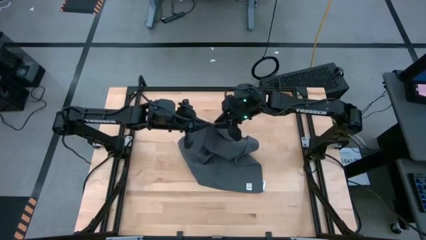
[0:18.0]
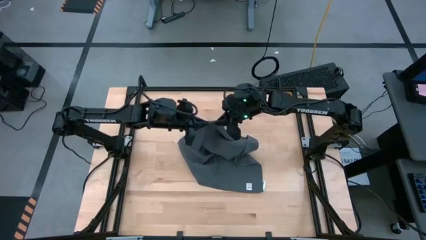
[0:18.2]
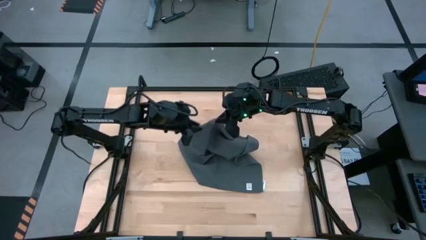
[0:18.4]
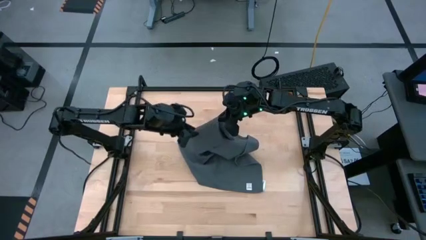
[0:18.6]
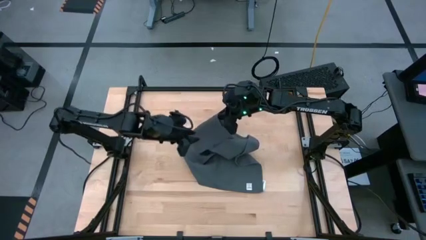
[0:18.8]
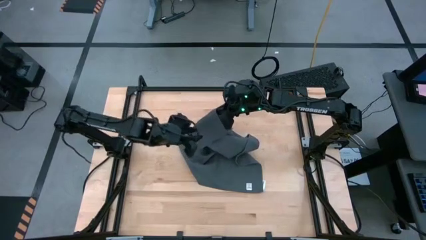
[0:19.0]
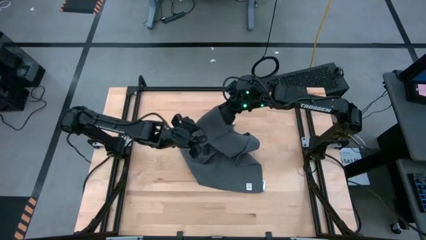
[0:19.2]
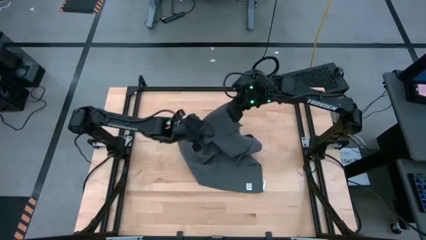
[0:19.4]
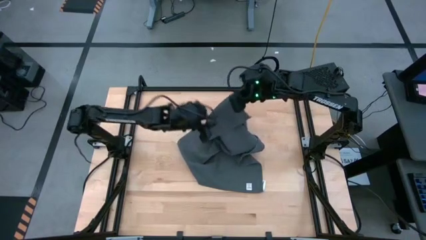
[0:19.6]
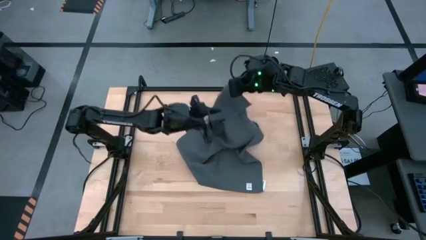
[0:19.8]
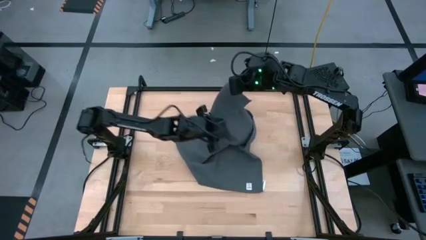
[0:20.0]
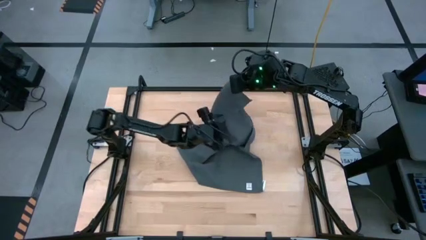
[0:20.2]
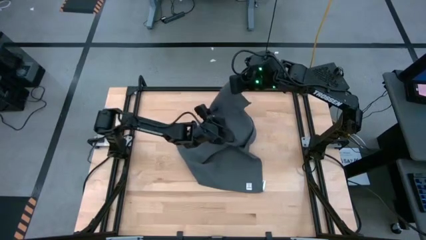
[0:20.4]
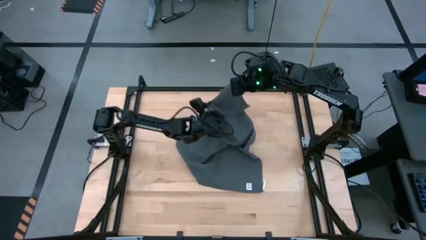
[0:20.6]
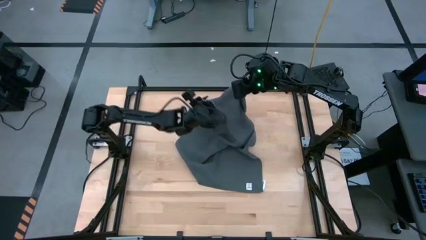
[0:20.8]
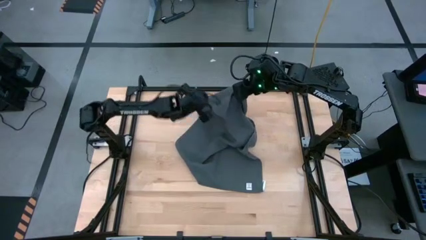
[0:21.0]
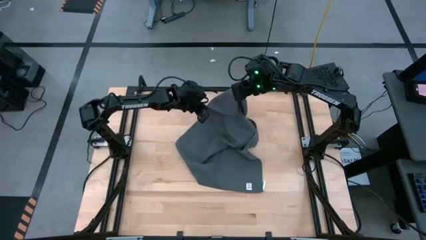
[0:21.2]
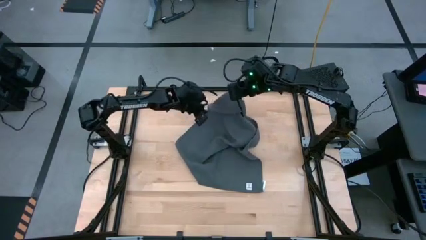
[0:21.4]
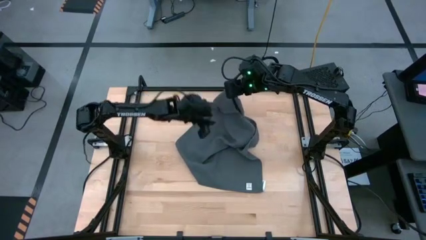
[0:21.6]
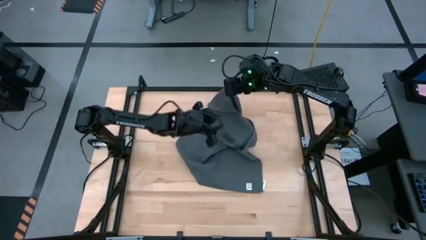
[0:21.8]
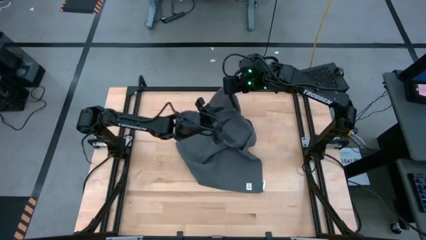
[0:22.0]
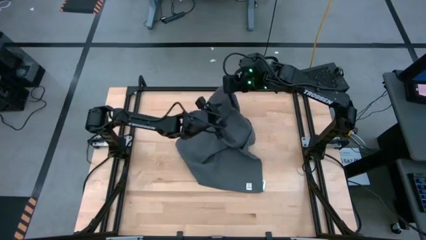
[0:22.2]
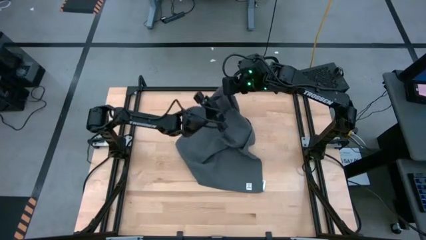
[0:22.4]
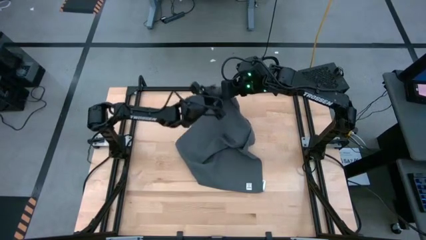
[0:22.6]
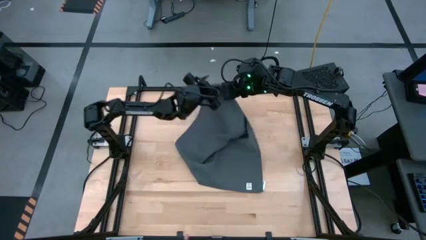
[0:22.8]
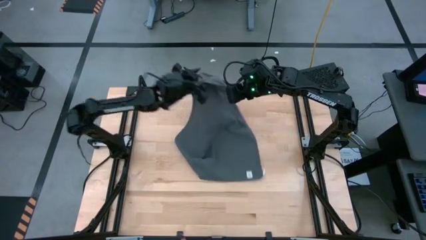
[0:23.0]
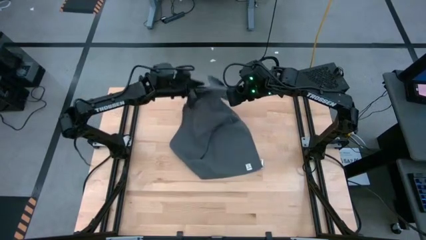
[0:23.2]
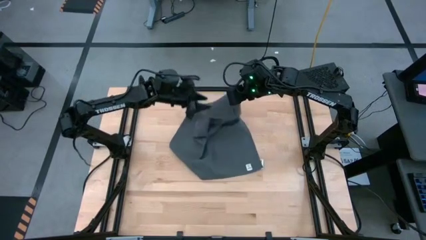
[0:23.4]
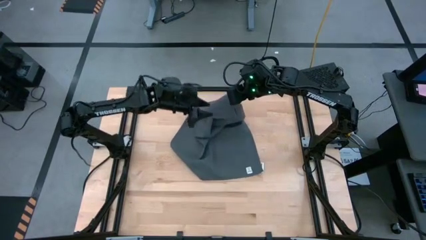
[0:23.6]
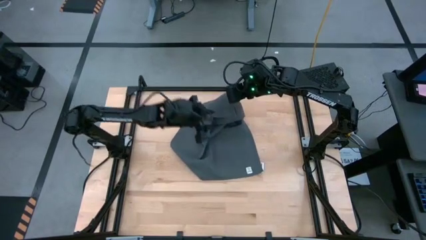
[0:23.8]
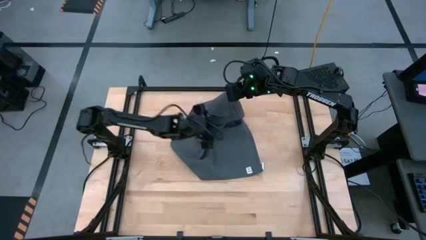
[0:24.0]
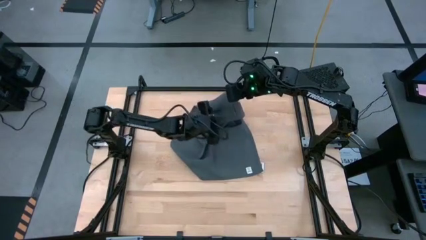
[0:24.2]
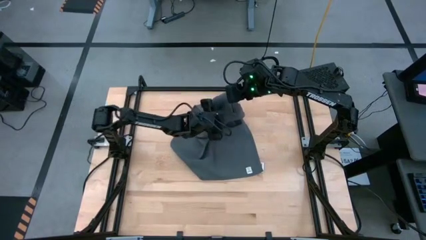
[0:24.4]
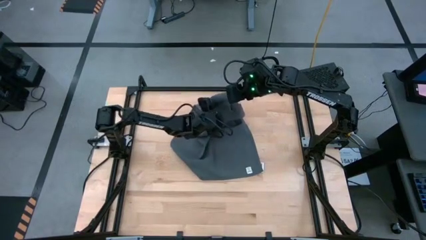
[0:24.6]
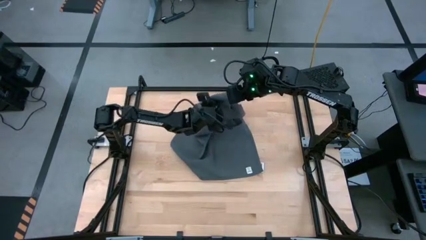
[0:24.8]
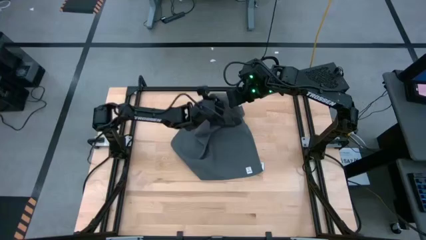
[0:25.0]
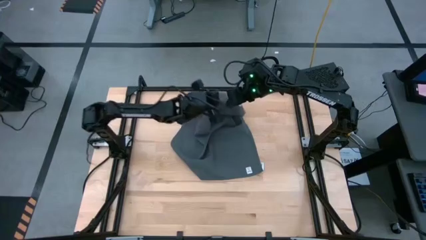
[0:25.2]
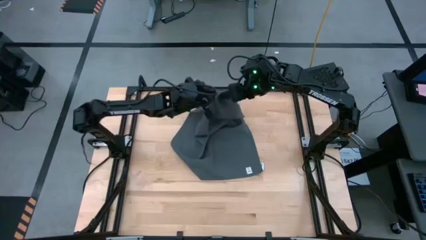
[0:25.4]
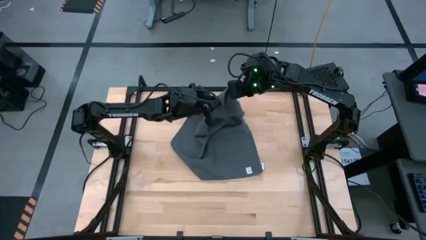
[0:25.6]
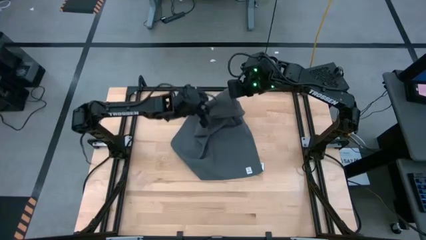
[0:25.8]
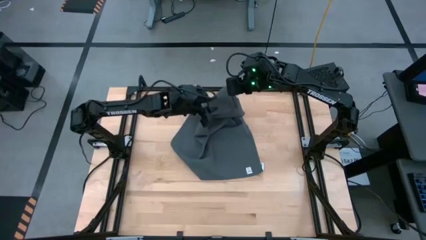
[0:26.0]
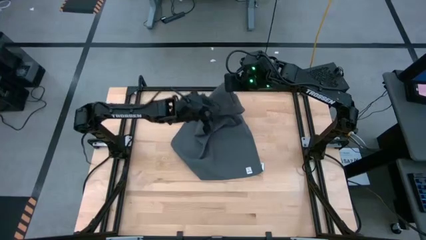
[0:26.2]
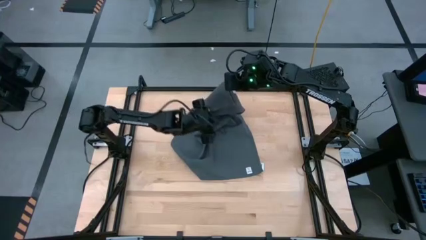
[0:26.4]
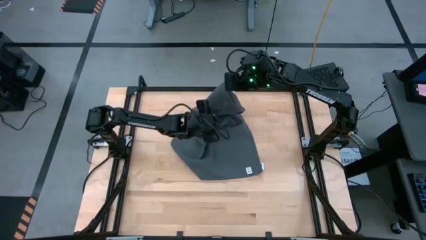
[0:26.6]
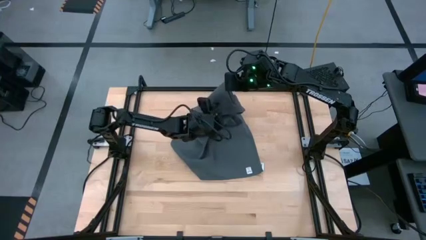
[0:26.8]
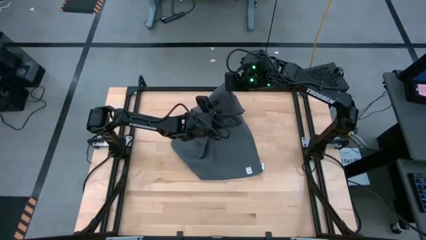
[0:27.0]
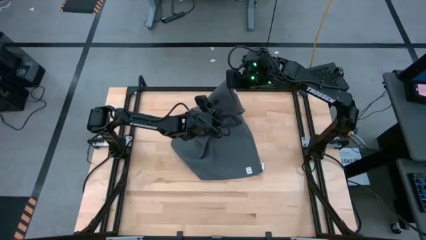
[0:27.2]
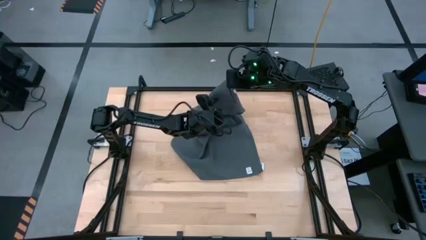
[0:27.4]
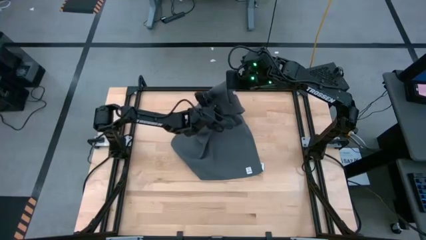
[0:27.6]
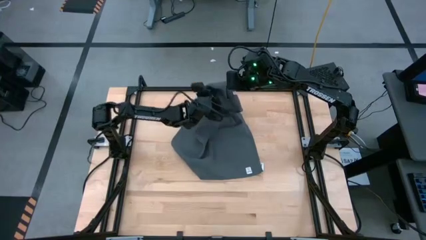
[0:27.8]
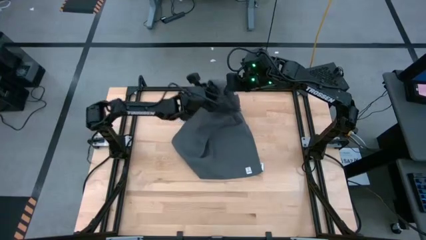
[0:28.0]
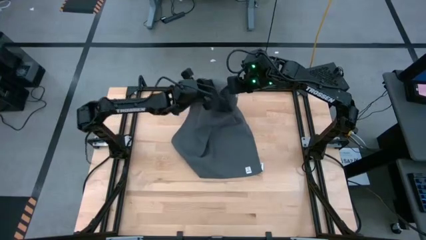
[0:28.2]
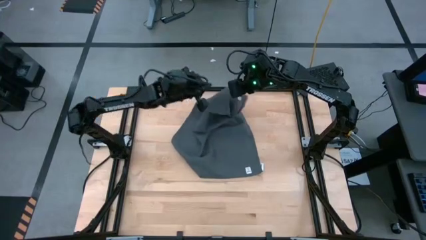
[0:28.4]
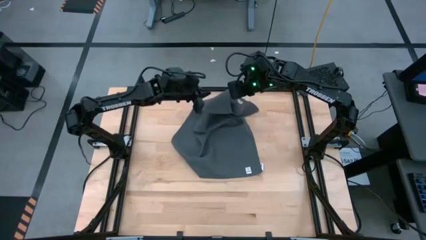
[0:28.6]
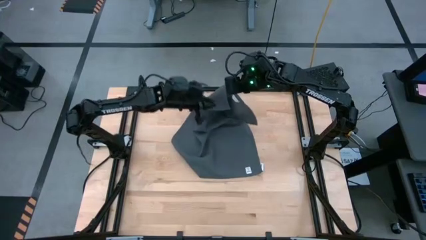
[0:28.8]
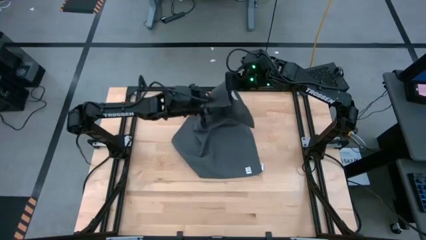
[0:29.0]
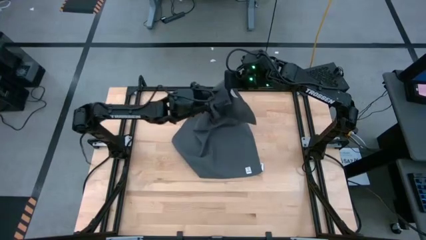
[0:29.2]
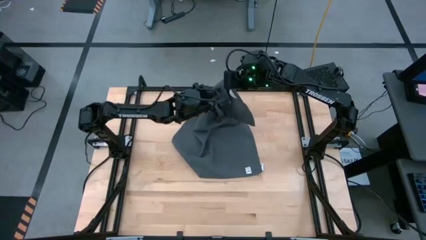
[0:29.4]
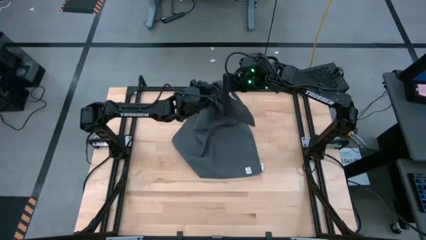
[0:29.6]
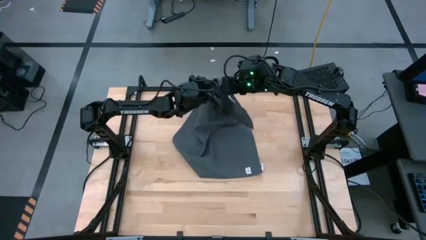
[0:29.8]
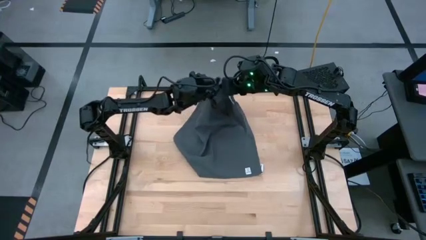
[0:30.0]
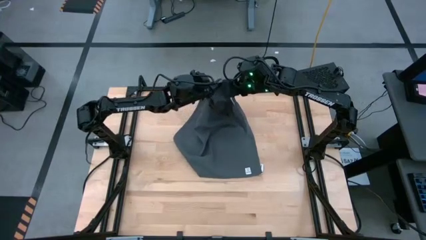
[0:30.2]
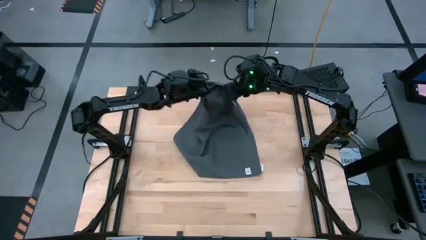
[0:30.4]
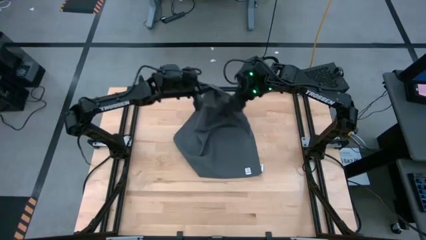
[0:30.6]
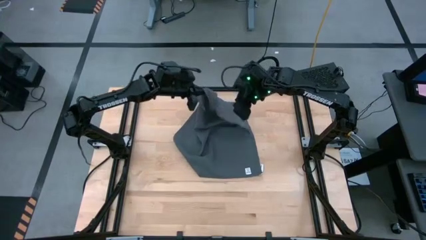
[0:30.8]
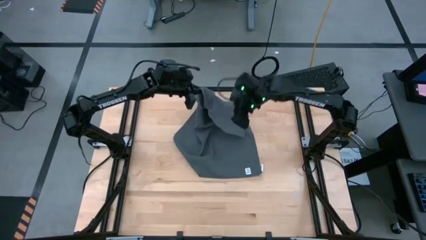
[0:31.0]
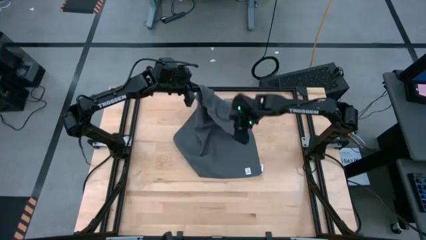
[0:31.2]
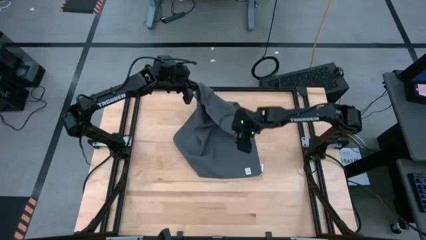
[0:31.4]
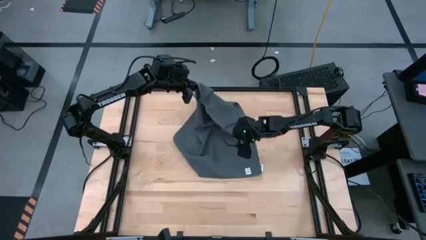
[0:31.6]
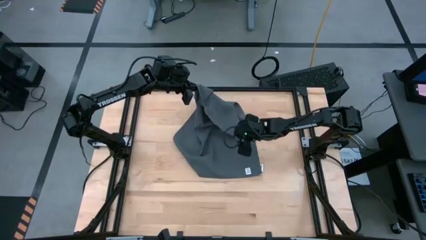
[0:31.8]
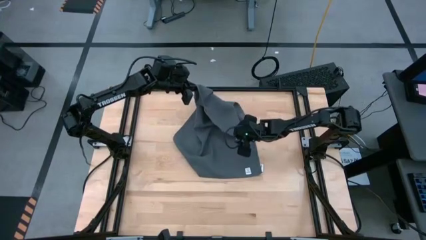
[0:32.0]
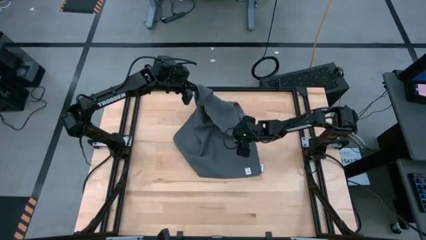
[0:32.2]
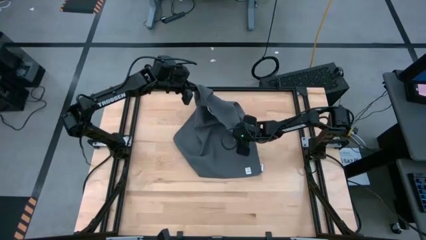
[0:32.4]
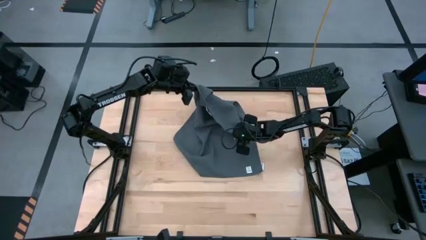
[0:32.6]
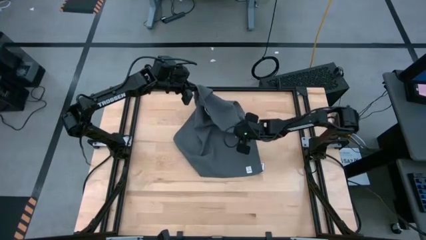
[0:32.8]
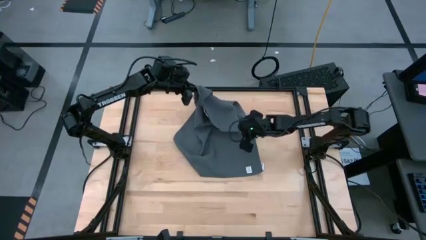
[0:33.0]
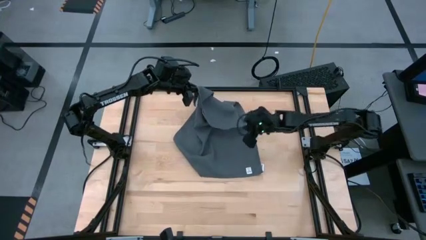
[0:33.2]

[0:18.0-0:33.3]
Task: Roll towel
Fold the gray towel on the center of table
